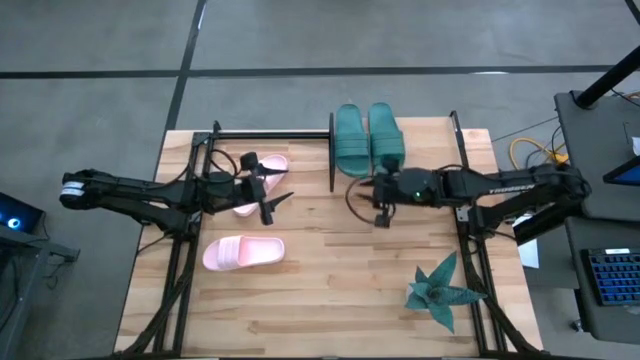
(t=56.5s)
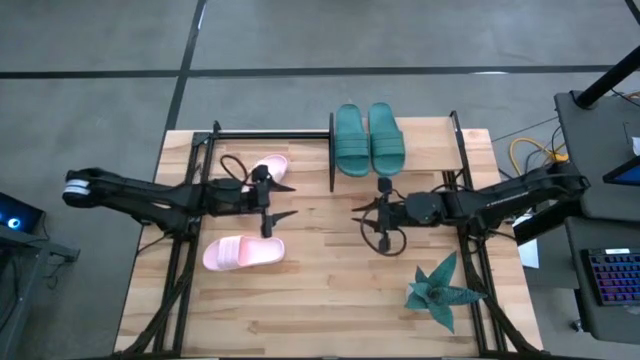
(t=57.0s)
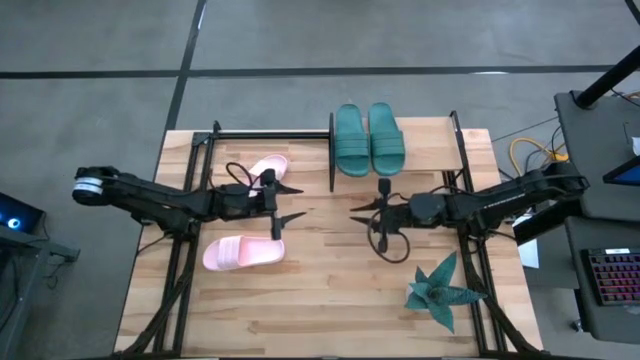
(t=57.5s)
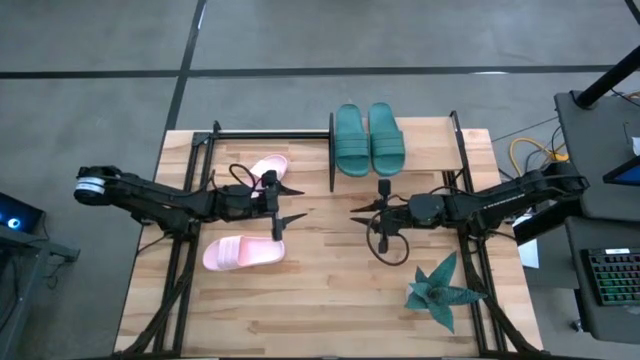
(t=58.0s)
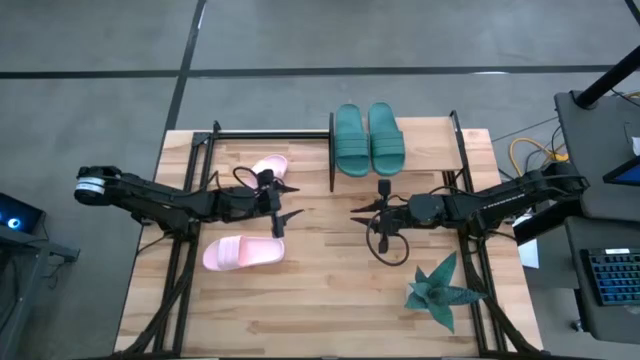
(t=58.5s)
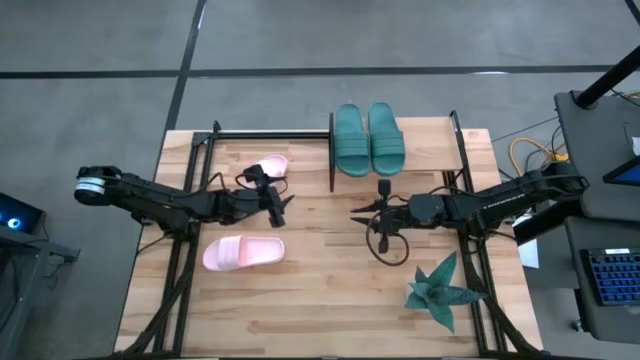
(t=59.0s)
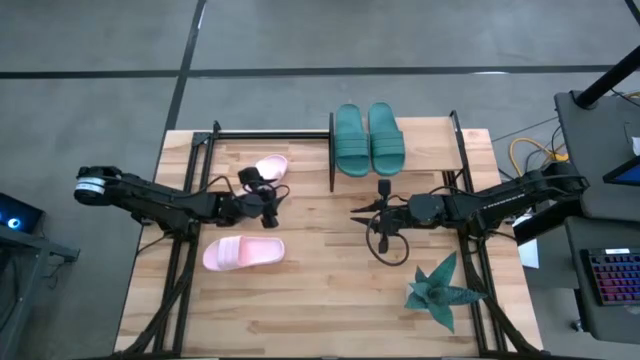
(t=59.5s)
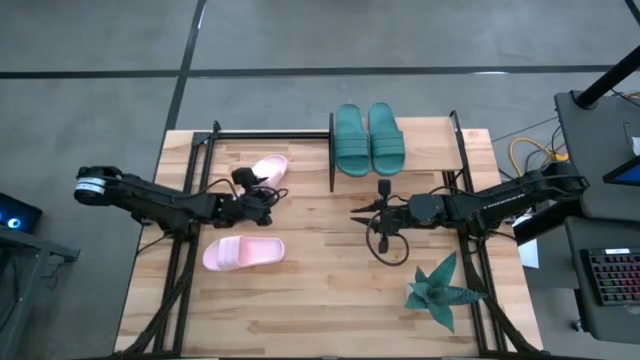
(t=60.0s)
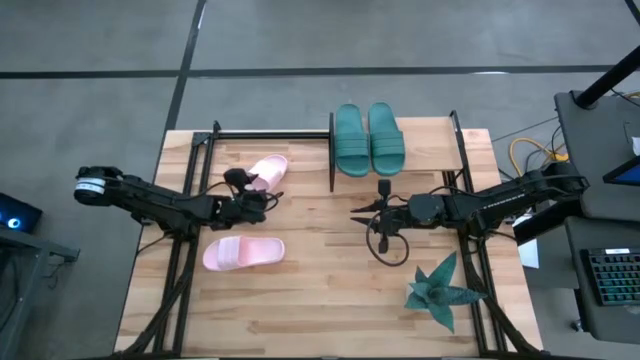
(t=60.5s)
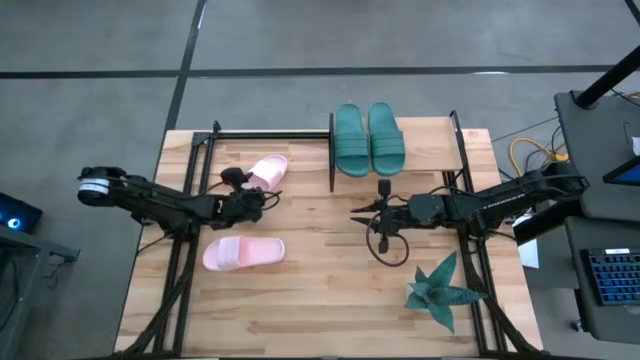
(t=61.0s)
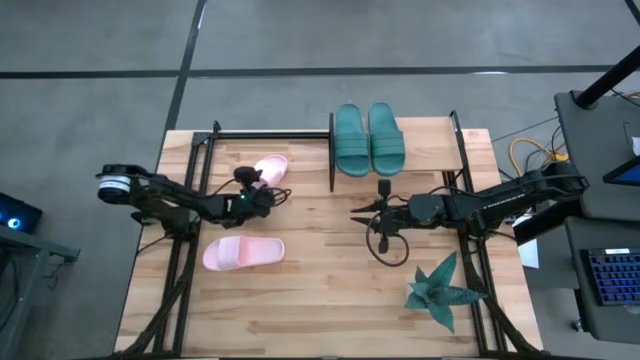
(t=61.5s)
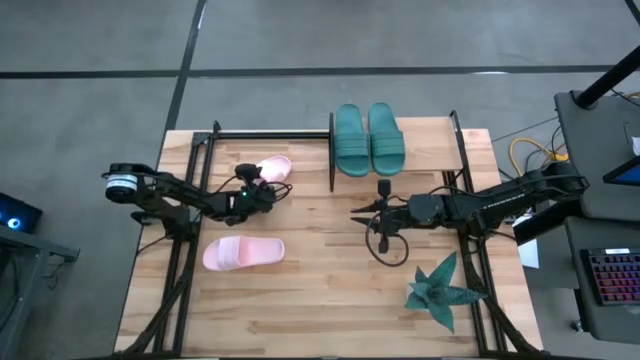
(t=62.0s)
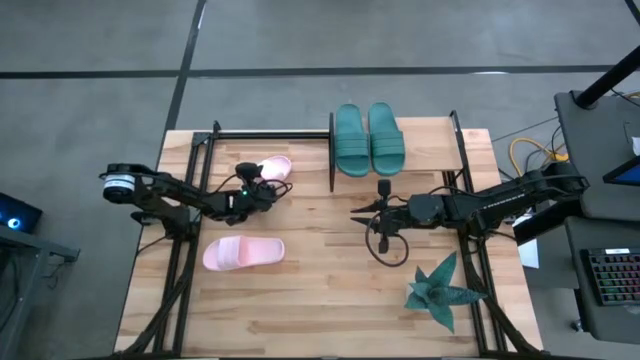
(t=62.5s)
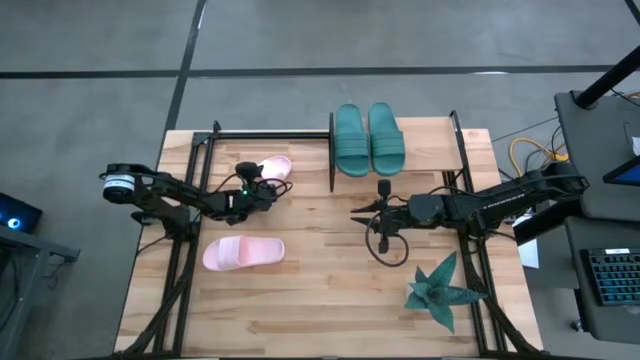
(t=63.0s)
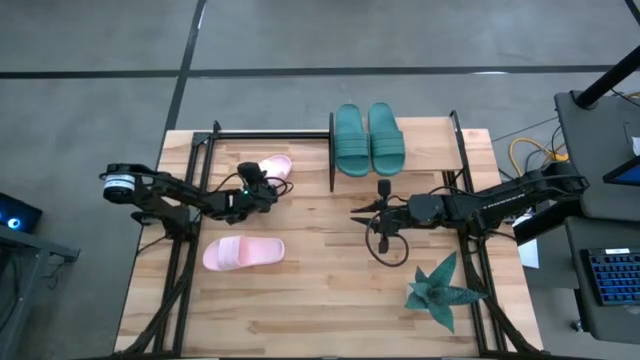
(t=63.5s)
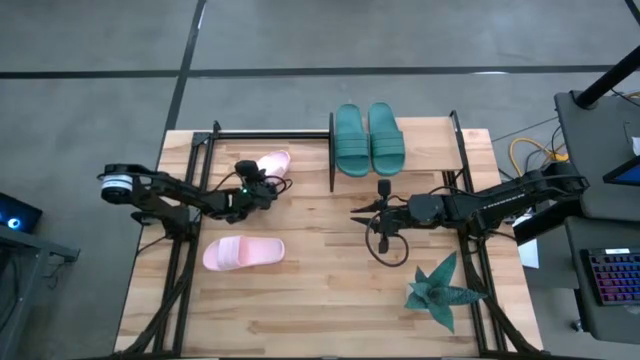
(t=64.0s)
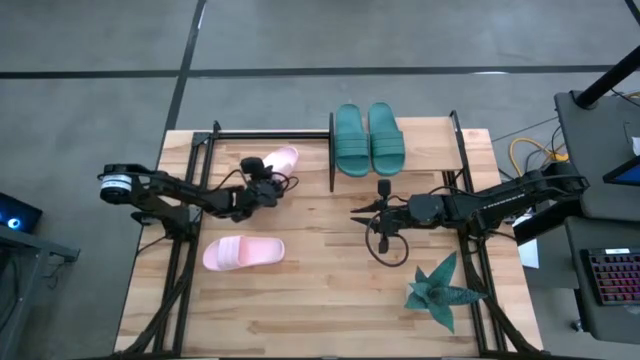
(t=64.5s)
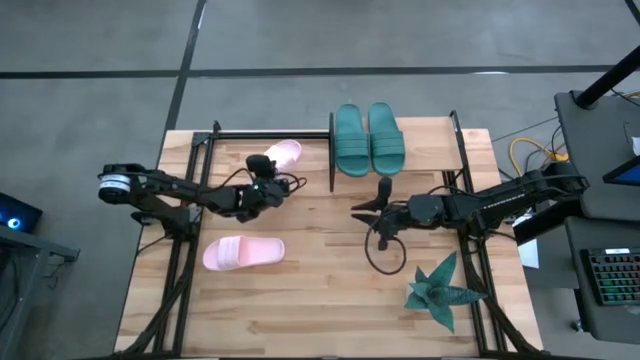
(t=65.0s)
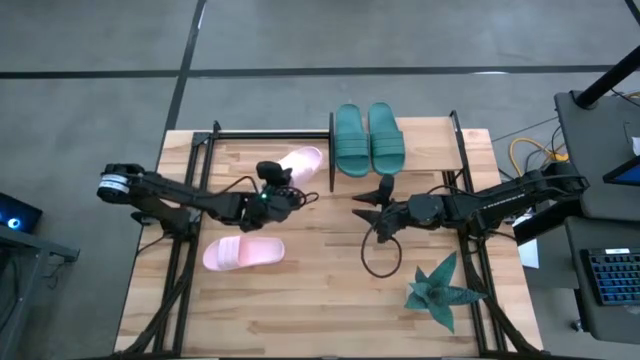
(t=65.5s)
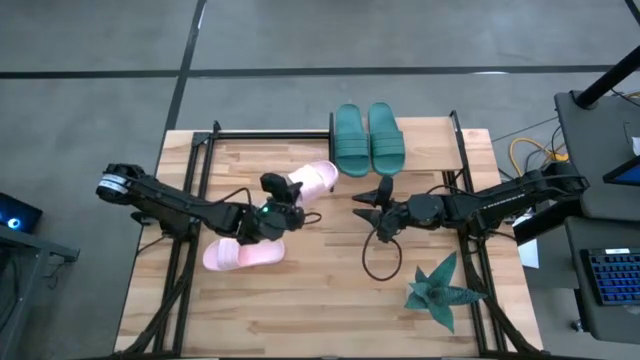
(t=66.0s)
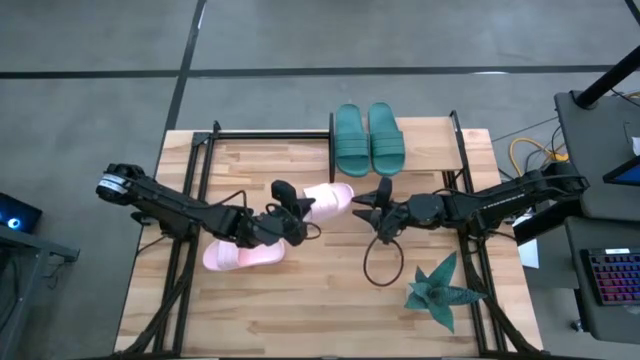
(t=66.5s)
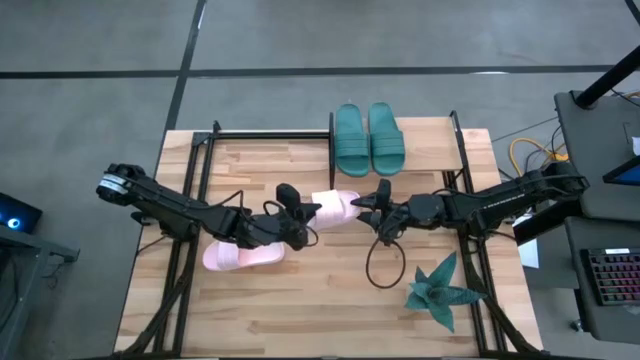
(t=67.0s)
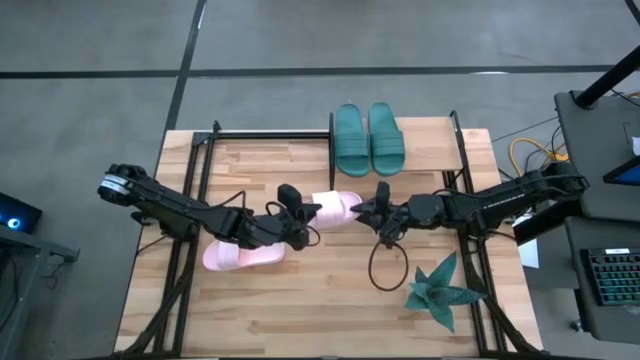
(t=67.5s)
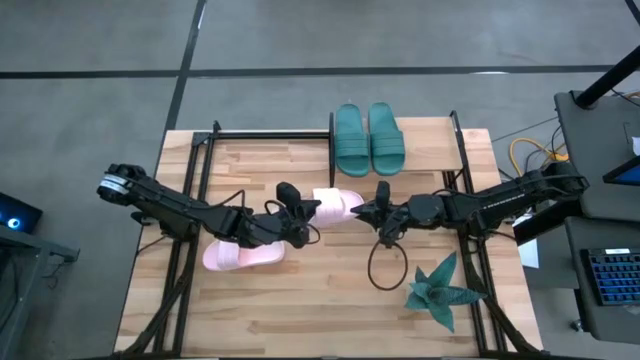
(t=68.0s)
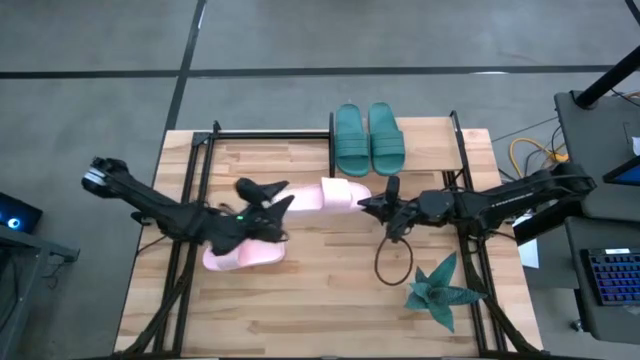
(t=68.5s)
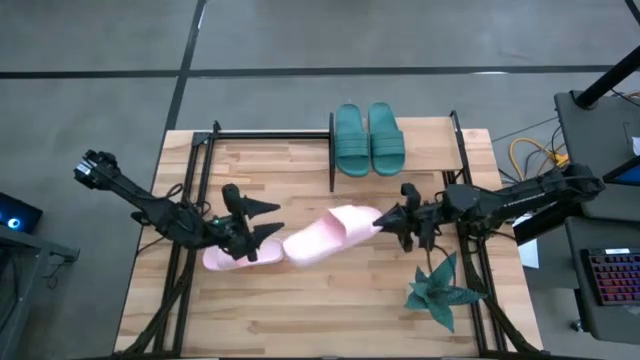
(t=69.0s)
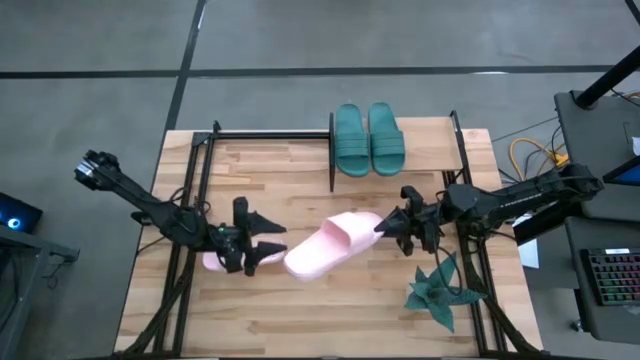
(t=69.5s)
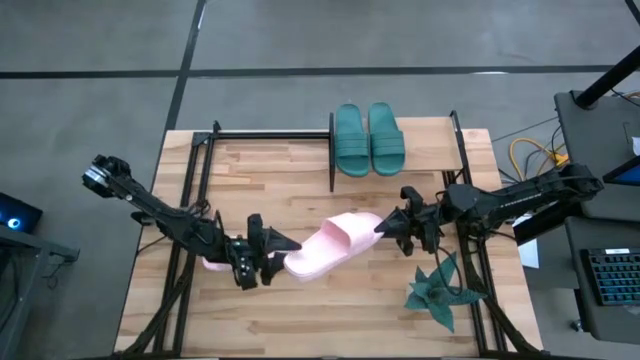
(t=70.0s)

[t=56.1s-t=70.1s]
Task: Pick and place slides into the shelf
Put the top pink slipper on the shelf

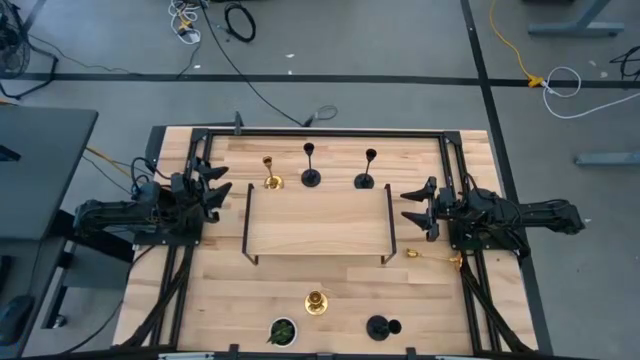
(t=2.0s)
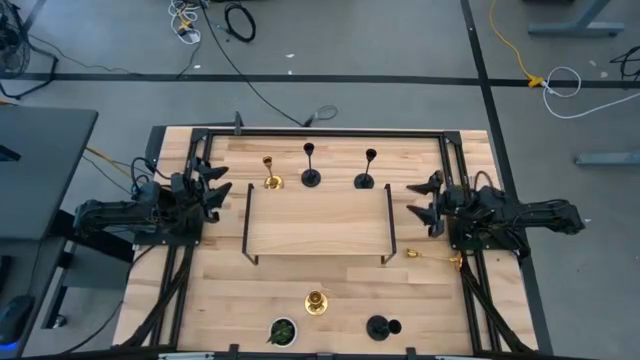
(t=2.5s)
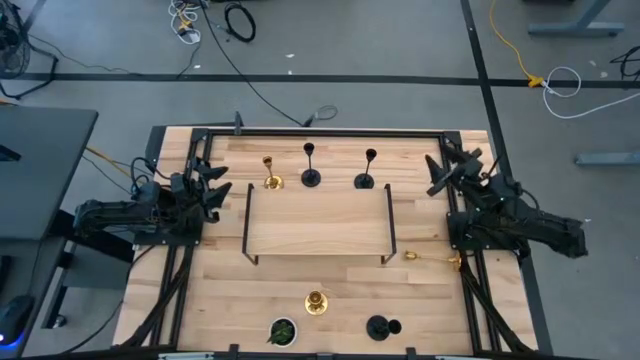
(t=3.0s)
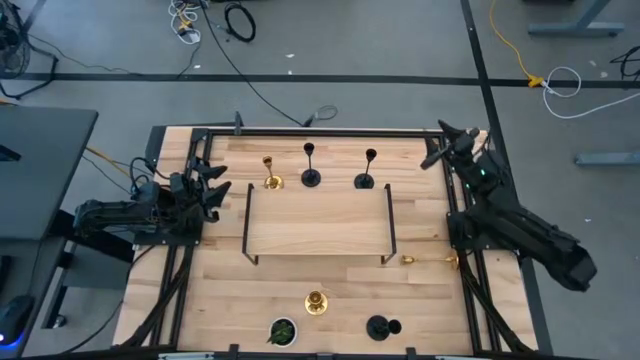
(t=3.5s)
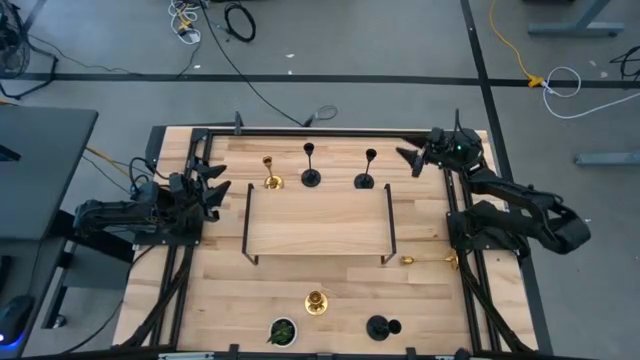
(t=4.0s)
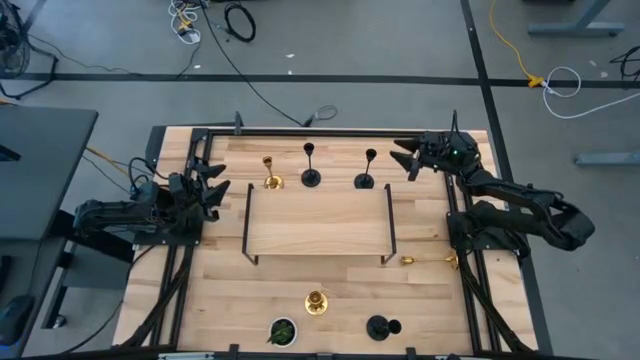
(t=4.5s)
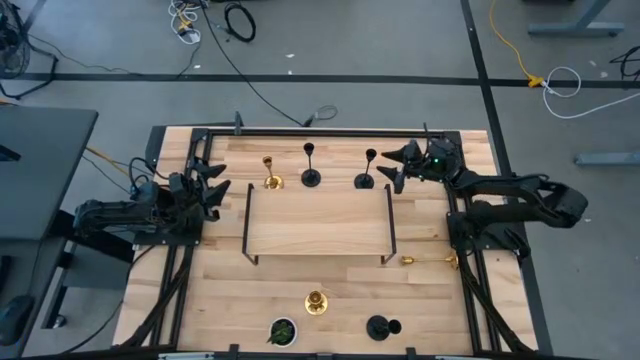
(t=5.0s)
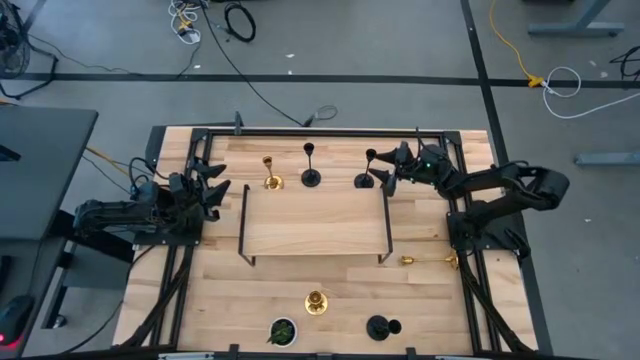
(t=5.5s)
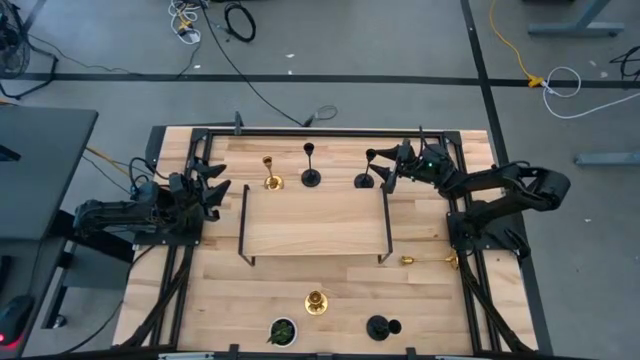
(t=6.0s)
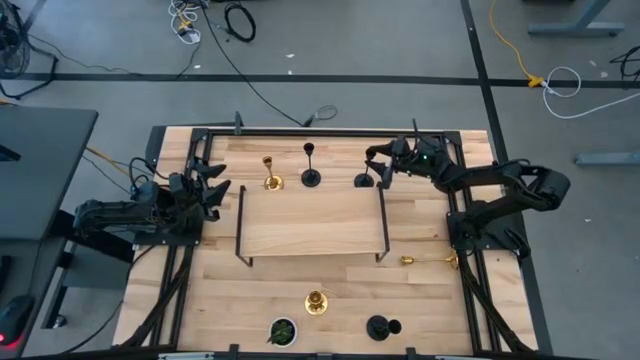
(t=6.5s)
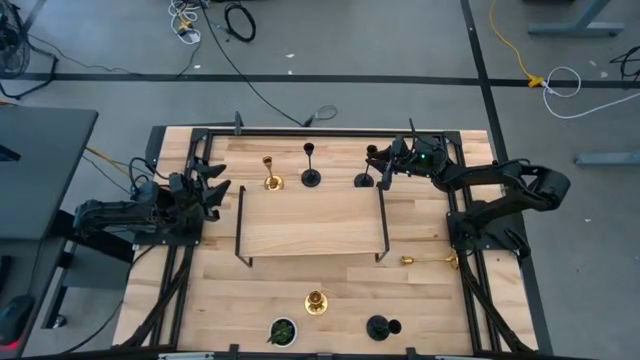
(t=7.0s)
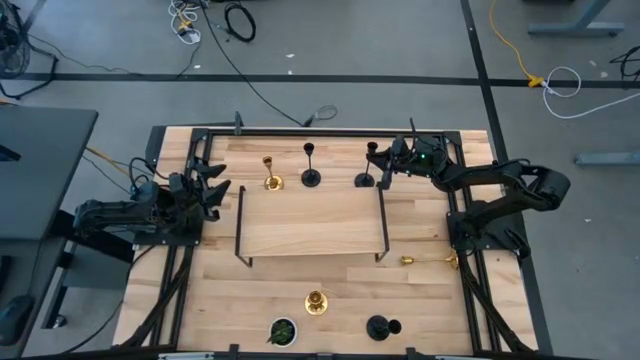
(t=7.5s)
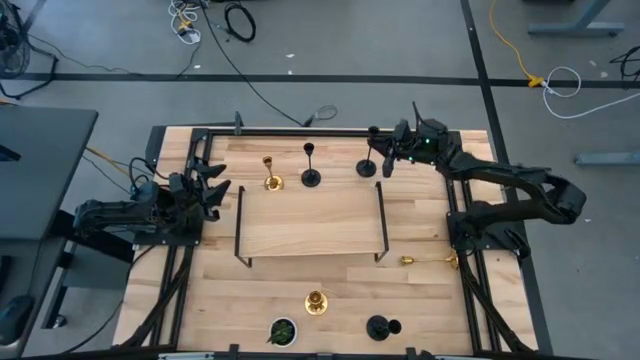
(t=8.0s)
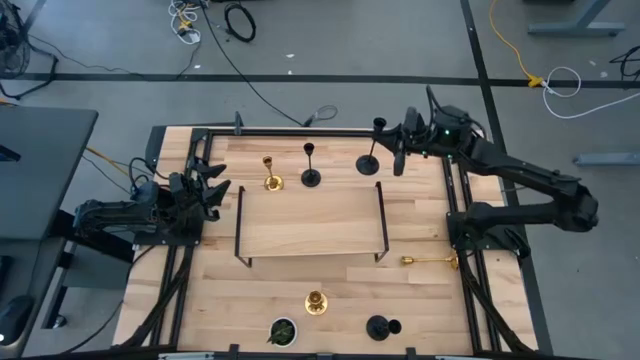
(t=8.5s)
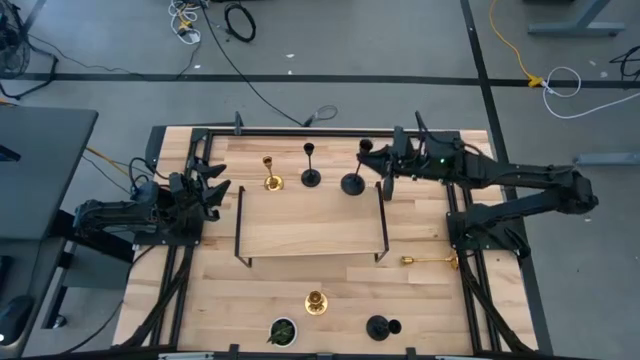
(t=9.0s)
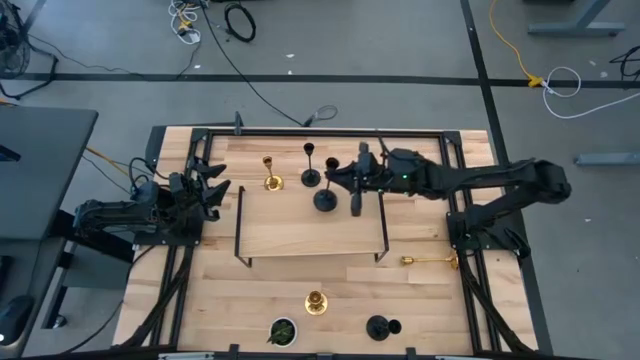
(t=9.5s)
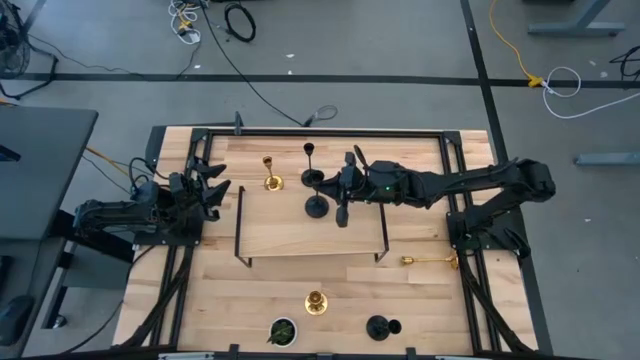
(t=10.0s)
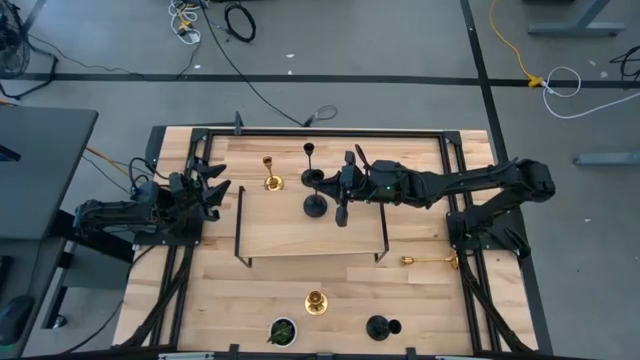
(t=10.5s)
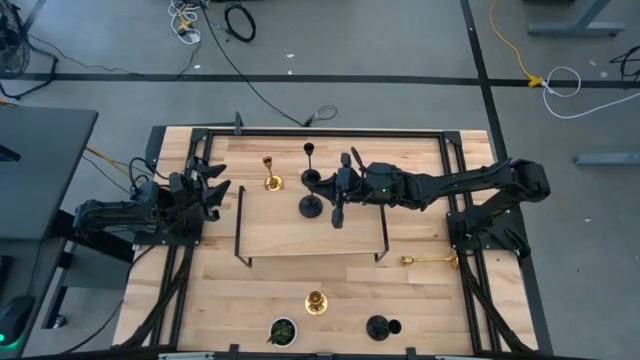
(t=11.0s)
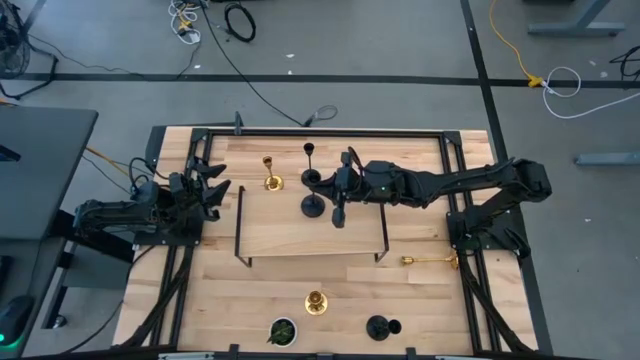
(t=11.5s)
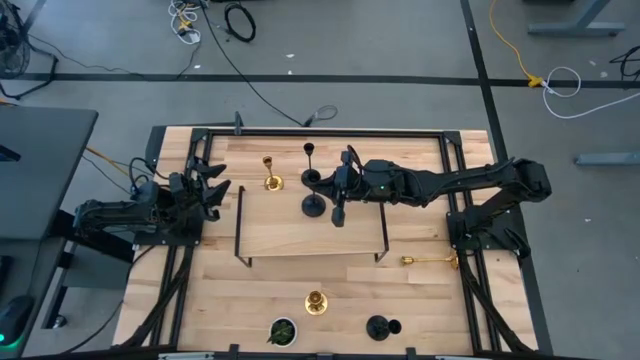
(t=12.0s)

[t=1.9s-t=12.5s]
Task: Pick & Place candle stick holders
Put the top right black candle holder on the shelf
